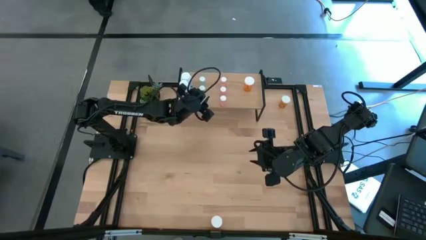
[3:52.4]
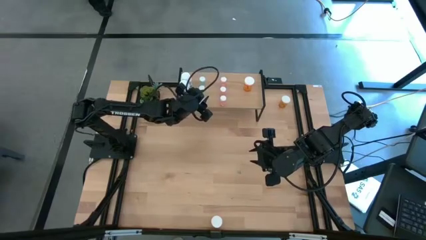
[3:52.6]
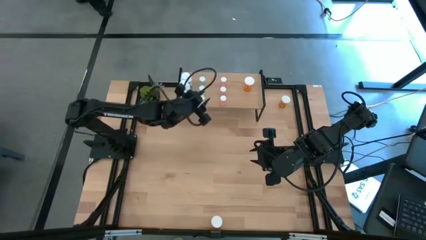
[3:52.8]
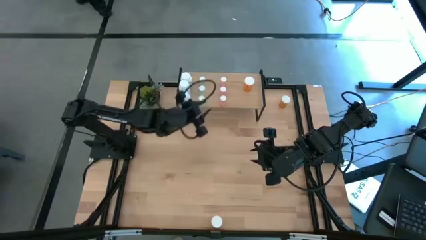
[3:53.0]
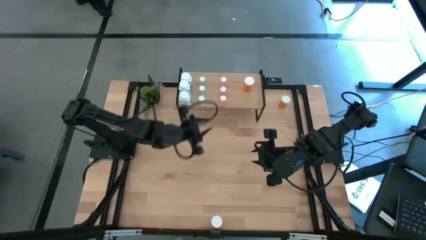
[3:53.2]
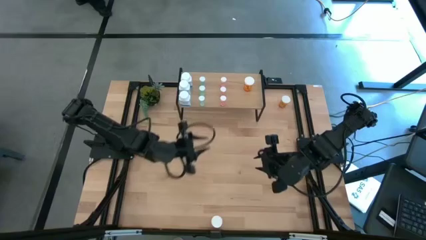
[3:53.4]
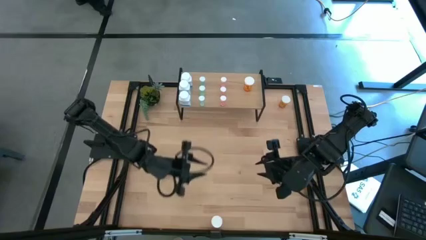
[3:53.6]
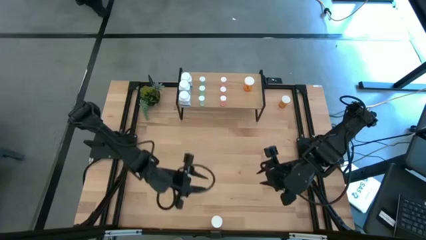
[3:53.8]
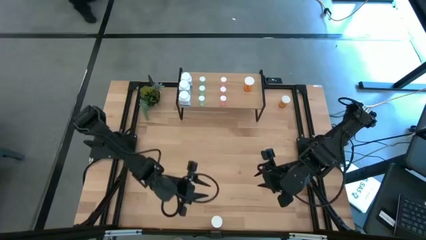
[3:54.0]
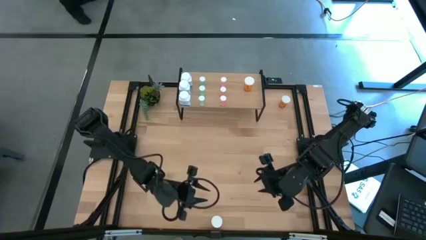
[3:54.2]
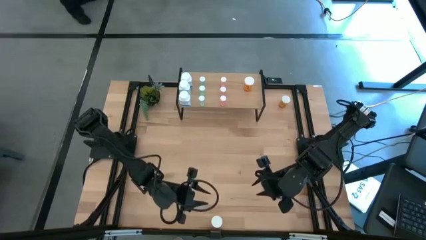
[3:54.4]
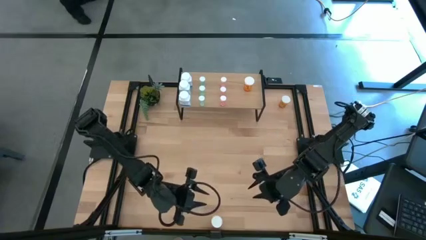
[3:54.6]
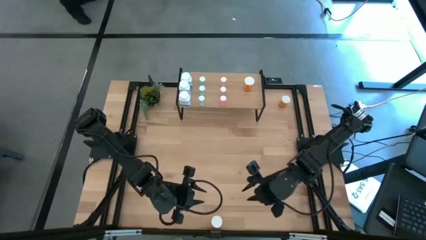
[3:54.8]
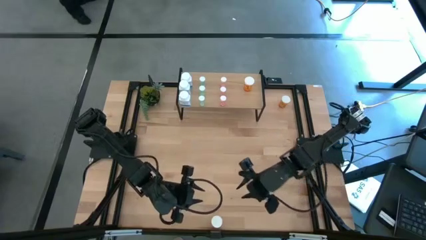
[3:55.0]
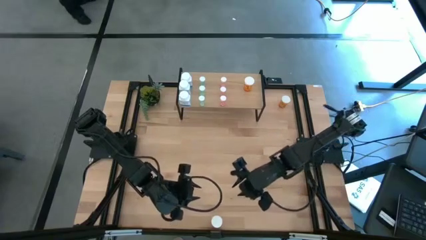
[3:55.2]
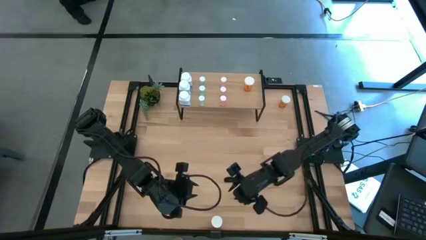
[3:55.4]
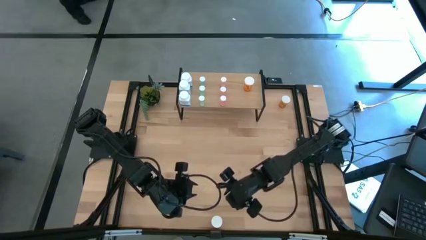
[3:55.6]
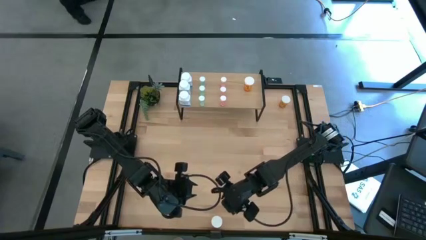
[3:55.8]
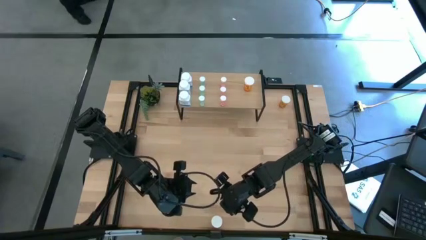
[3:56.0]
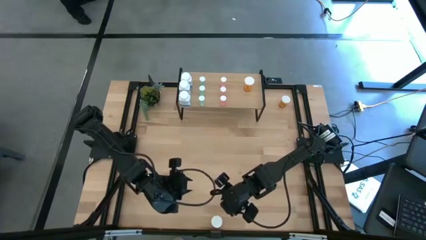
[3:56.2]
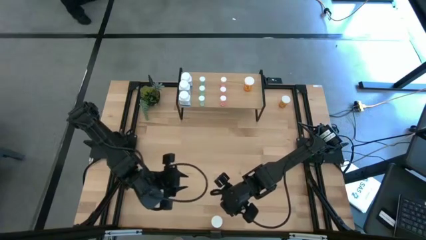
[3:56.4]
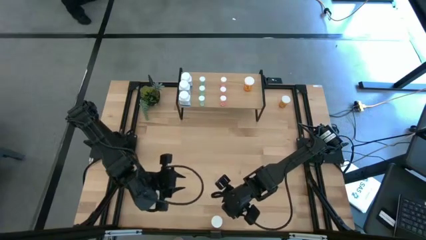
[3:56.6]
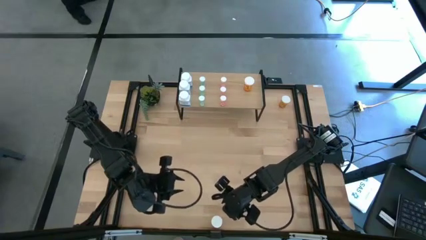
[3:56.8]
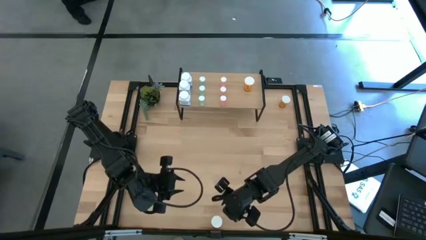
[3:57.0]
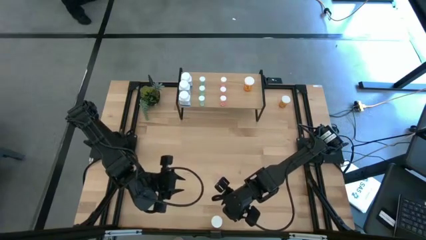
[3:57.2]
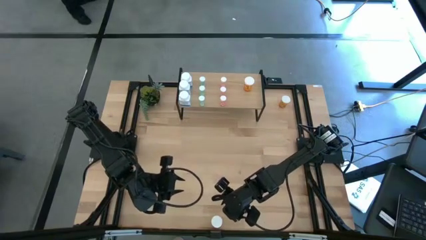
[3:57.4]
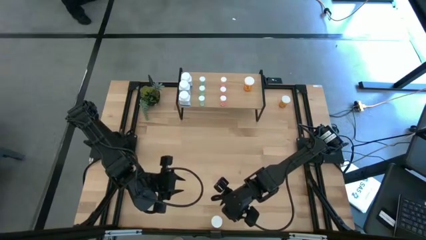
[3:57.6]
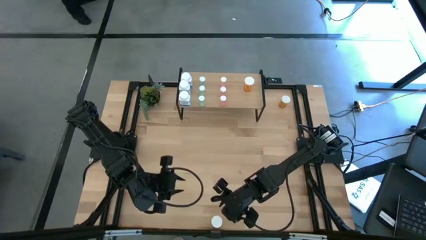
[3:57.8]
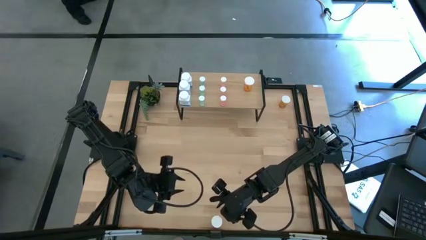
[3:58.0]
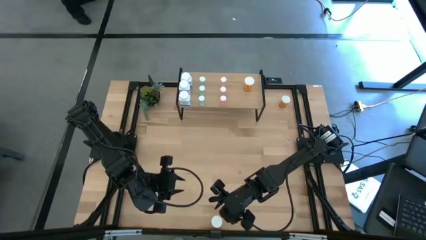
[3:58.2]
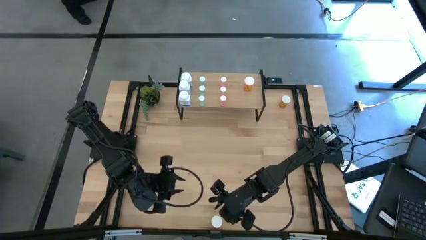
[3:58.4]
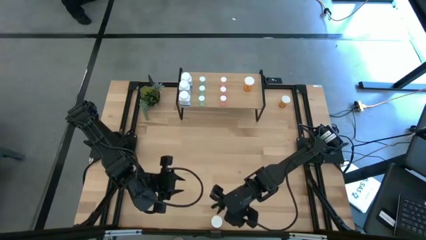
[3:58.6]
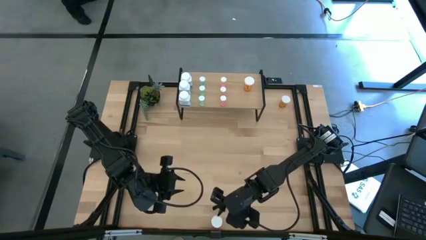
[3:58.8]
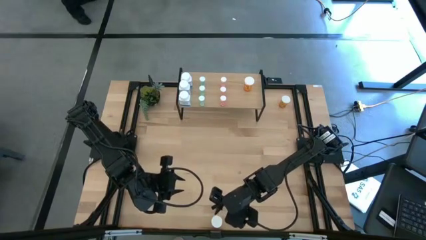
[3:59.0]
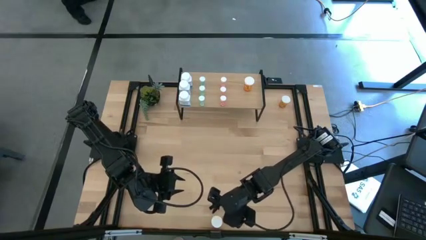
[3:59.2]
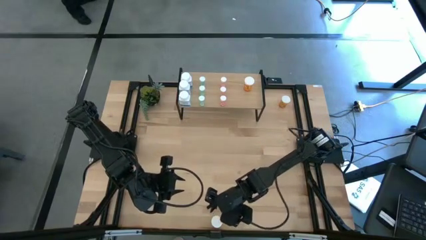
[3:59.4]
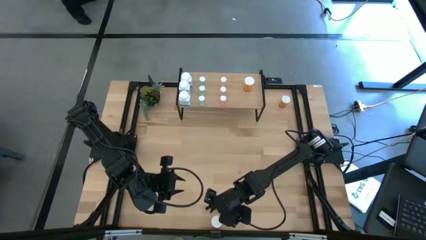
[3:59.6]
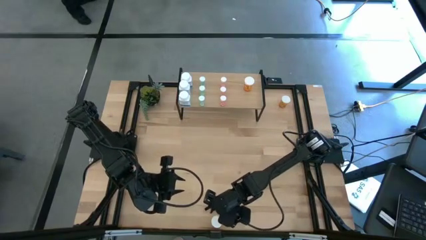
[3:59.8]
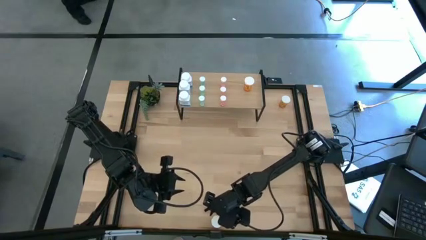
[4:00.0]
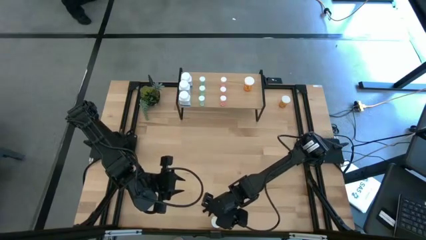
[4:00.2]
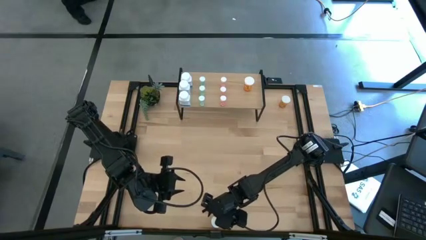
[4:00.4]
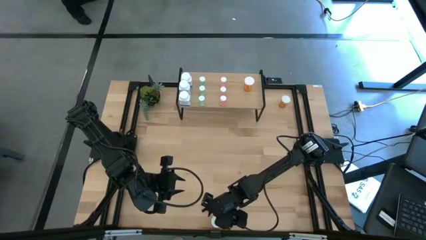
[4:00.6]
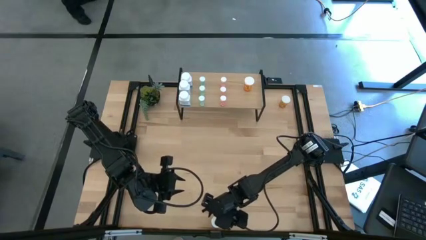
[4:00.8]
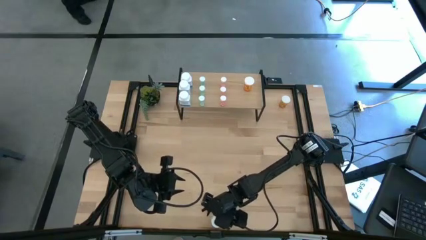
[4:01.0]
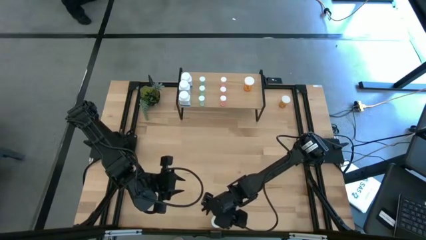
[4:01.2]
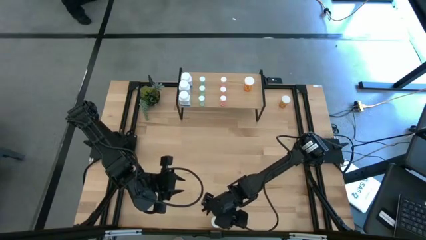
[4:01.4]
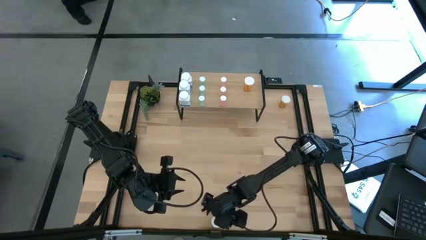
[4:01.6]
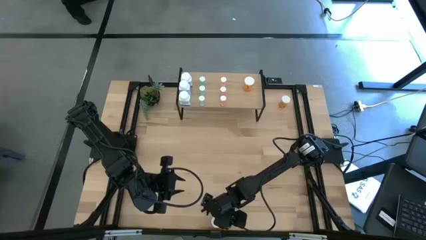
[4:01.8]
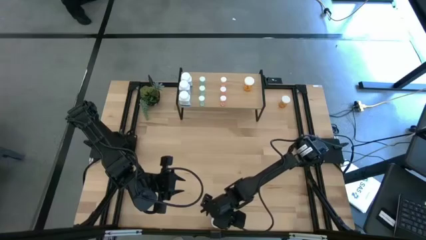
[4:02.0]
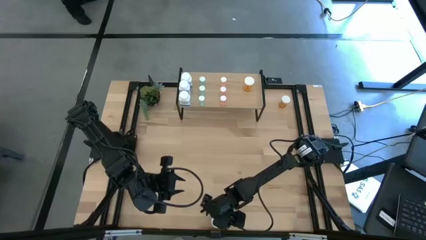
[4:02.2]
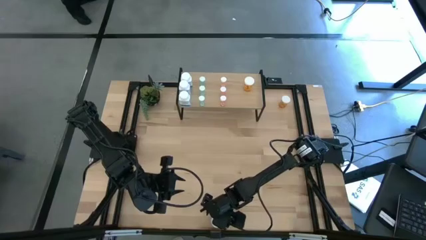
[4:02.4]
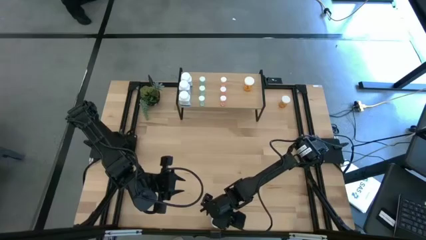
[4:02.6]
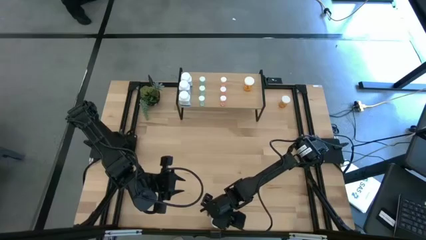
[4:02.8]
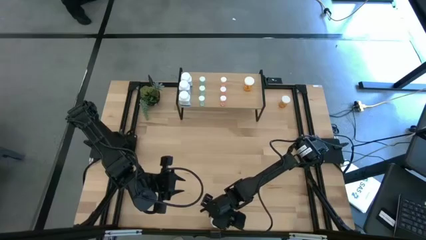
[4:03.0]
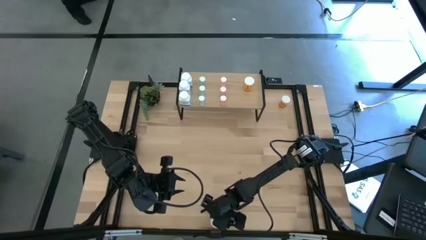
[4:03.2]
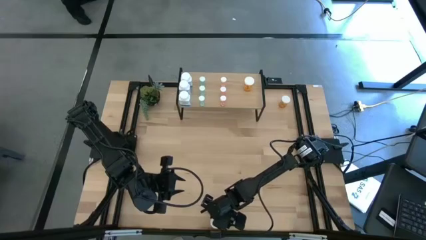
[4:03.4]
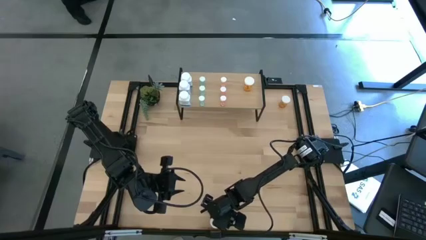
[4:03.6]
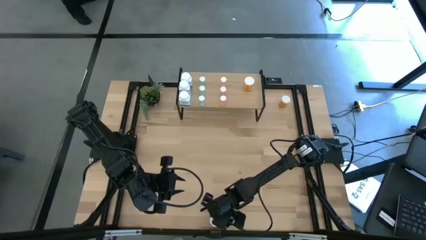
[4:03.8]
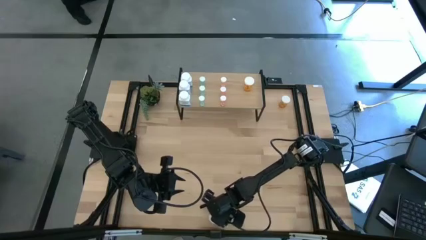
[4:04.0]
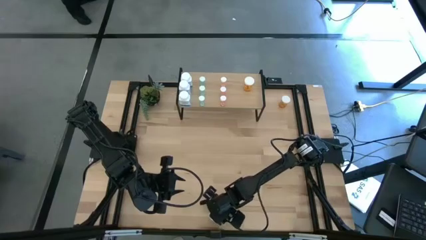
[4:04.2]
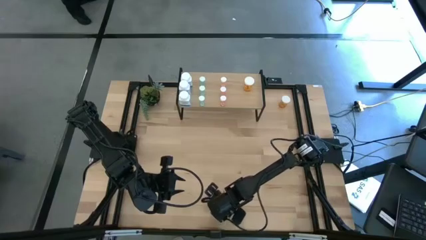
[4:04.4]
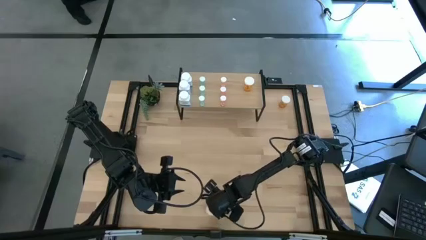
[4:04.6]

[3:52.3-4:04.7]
Task: Pick and place medicine bottles onto shelf by color
Put the bottom orange pill bottle on the shelf aligned with the other orange pill bottle

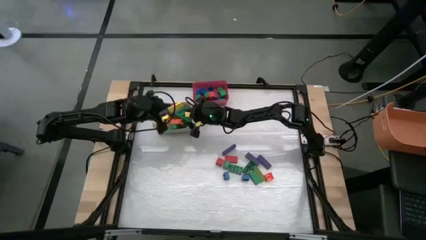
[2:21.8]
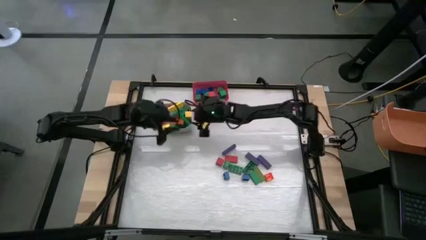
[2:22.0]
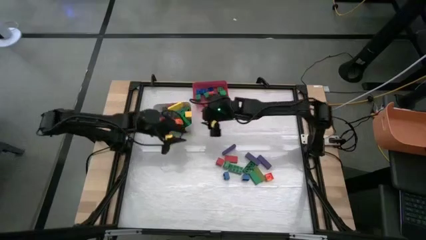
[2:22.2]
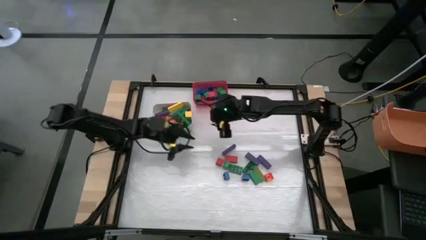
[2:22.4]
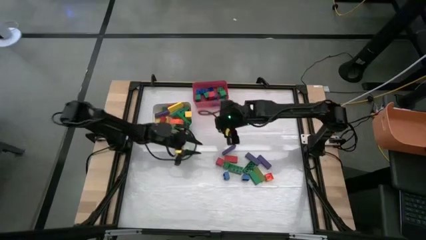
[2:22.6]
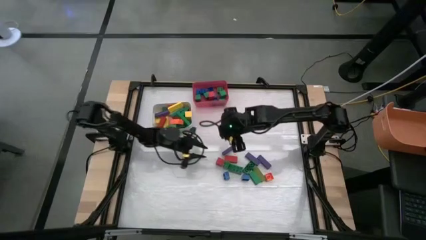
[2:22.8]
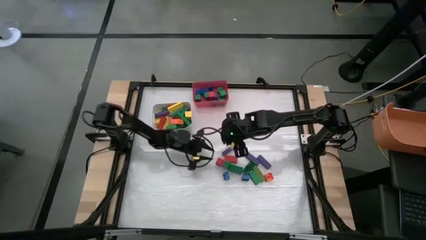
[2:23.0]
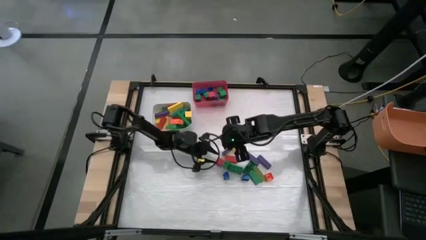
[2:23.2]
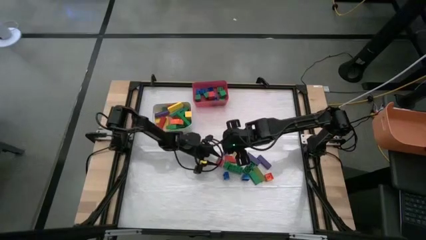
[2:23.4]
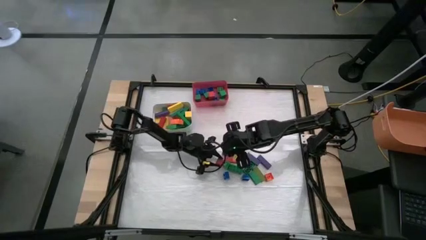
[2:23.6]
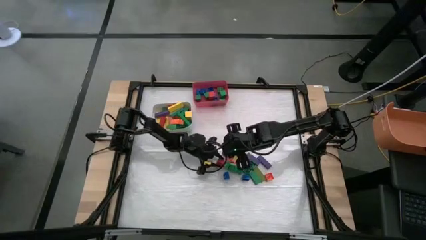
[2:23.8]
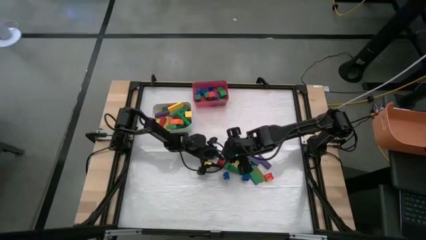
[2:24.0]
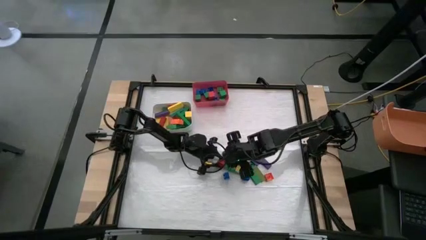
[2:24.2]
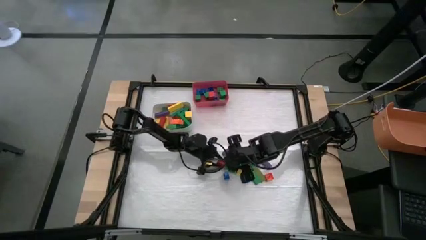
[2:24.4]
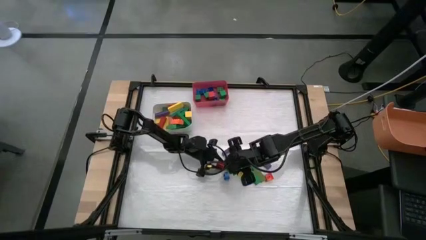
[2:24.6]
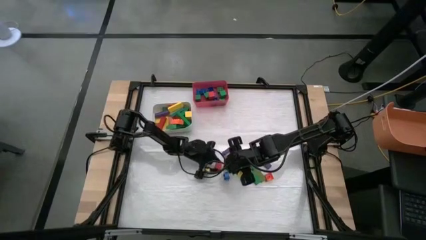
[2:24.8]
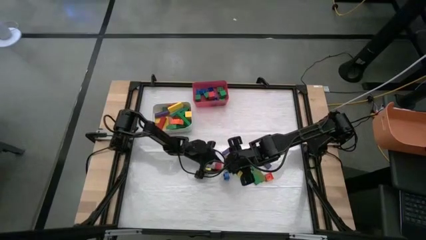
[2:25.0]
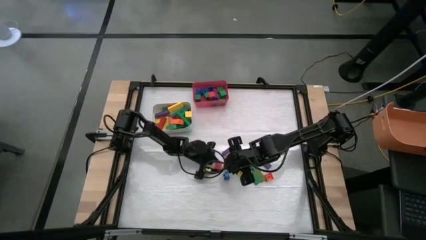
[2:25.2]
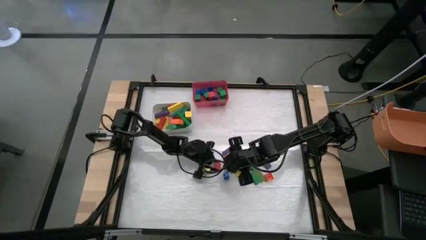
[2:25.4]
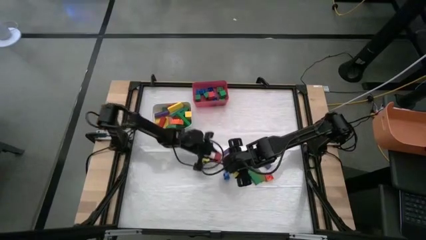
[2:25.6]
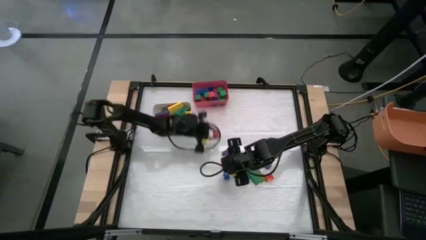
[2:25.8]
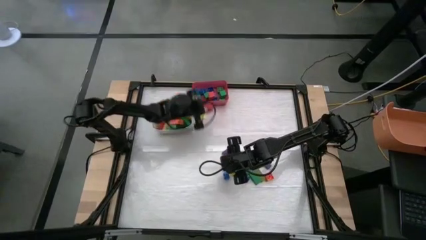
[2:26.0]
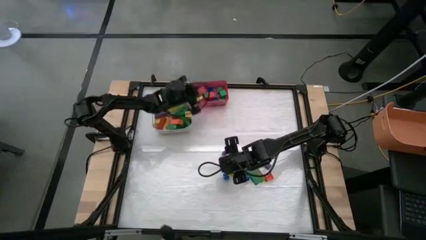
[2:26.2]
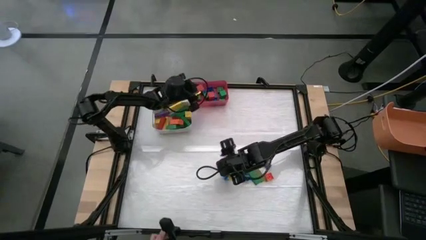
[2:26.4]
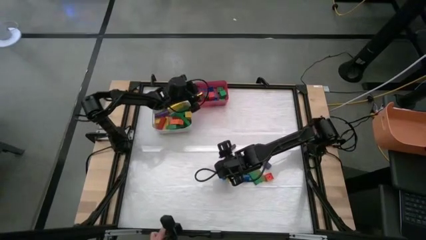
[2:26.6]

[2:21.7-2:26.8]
Task: Sort blocks by size
Put the small red wooden block into the white bin
